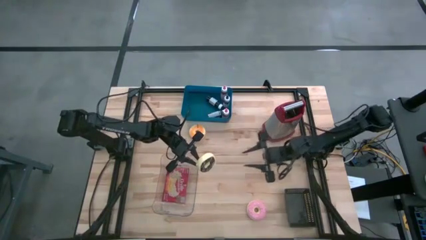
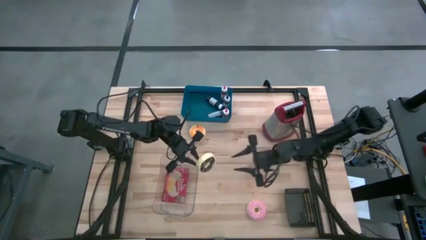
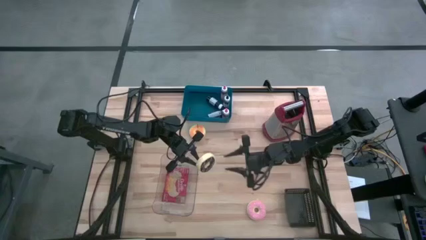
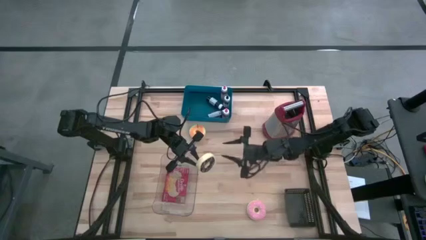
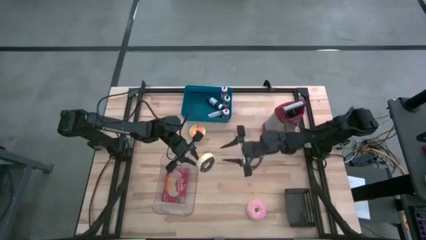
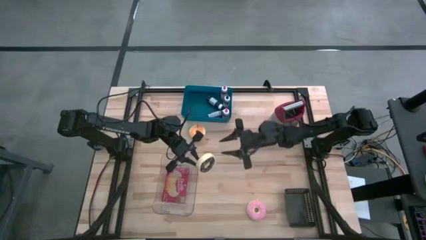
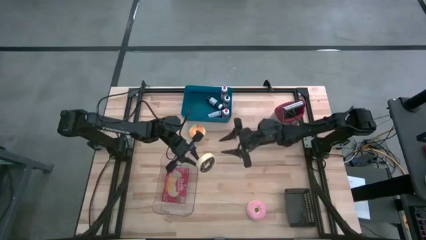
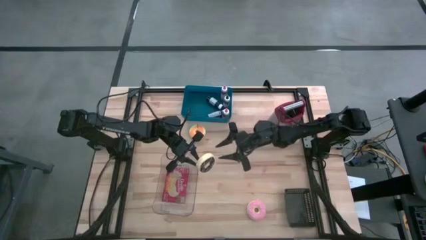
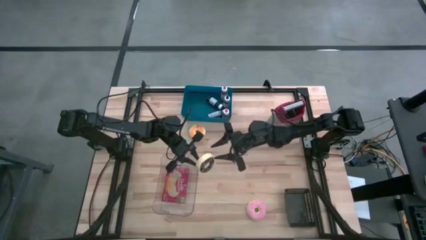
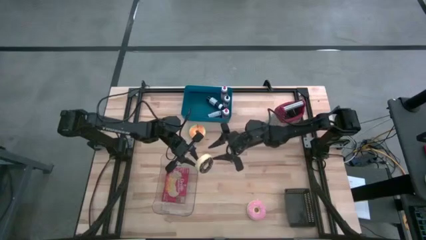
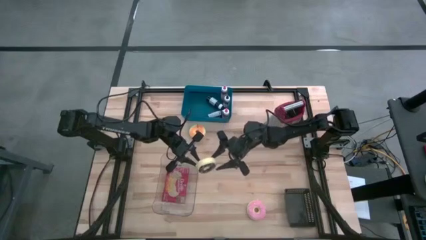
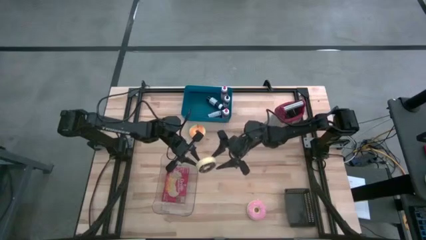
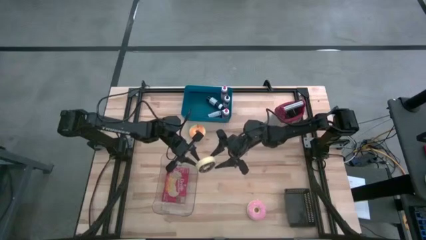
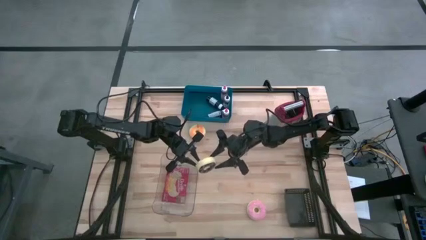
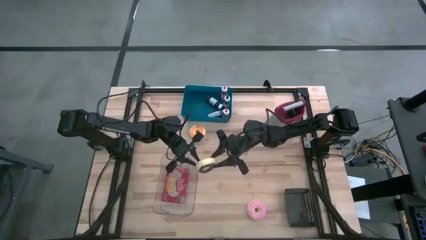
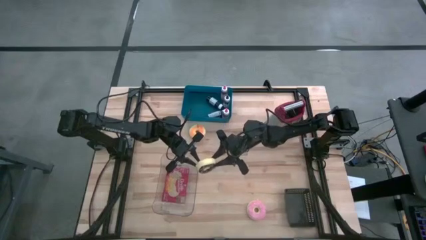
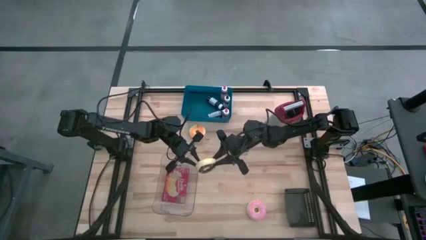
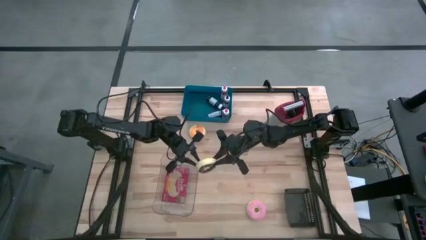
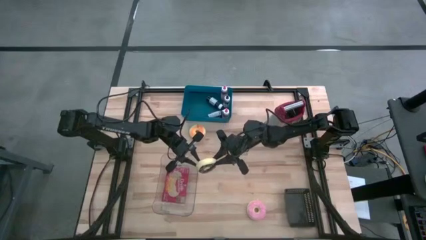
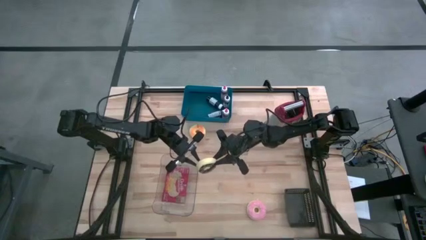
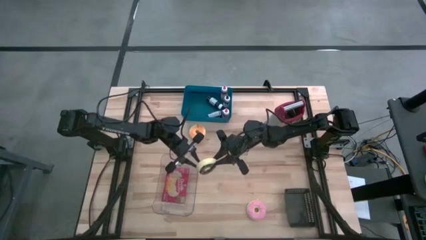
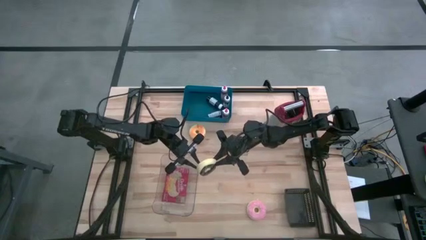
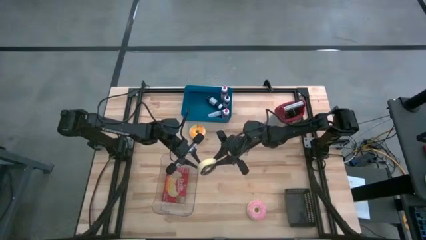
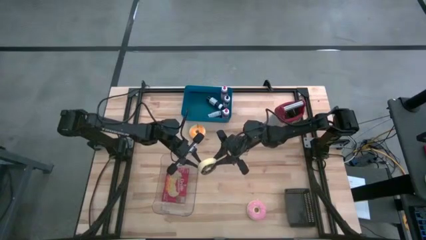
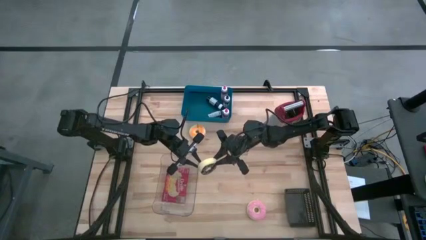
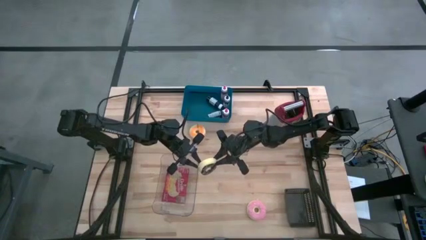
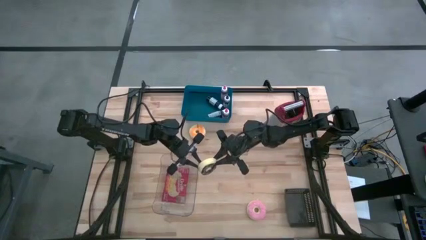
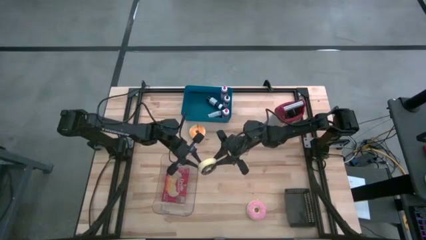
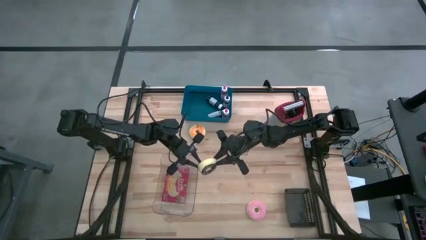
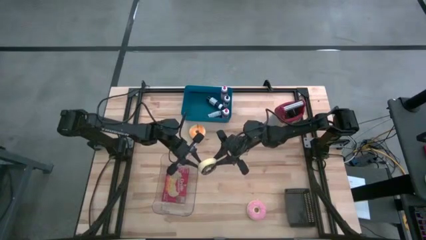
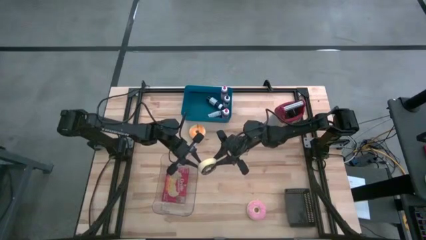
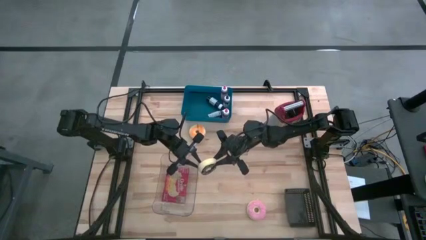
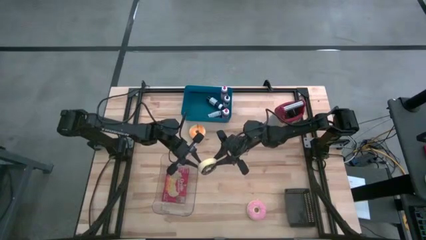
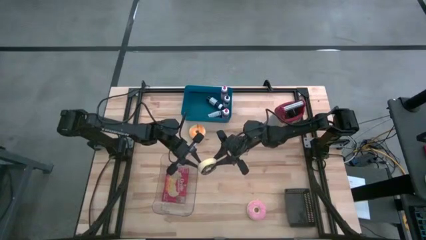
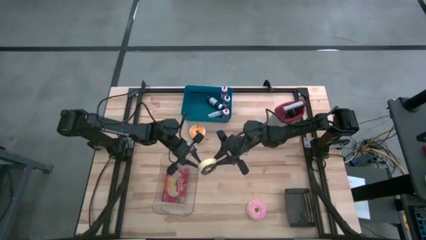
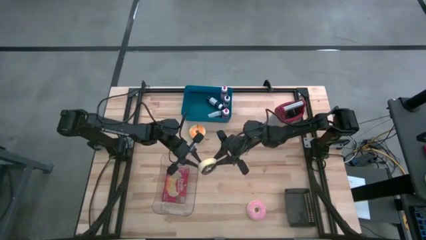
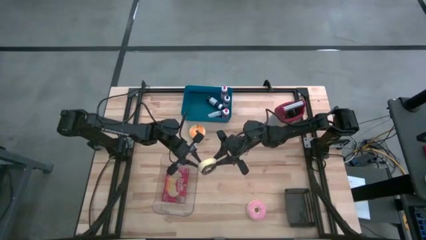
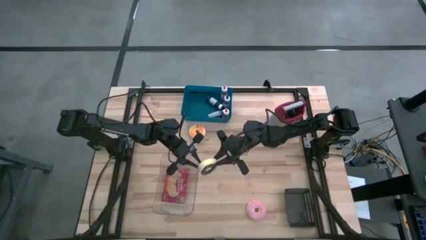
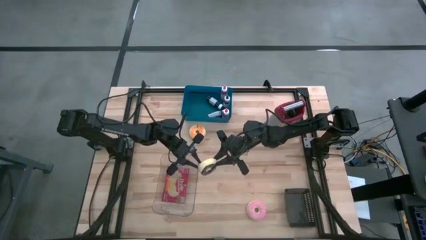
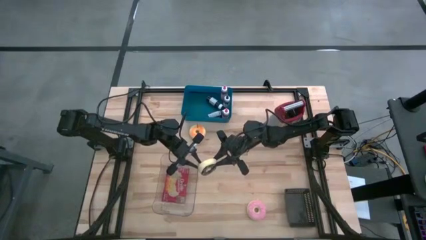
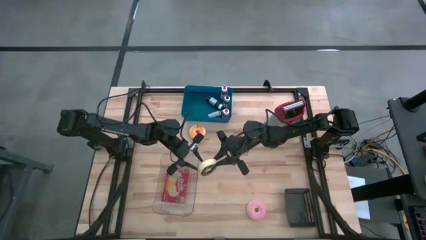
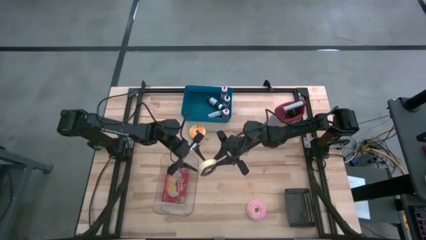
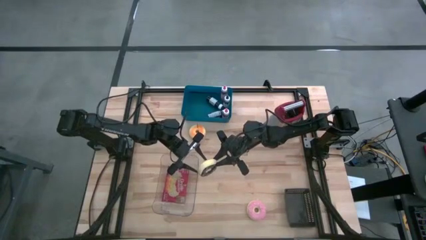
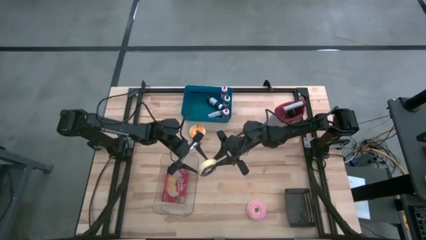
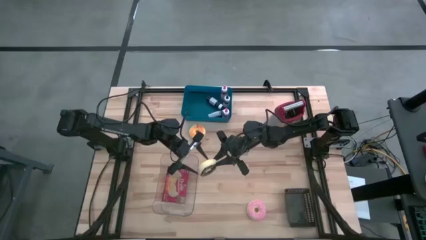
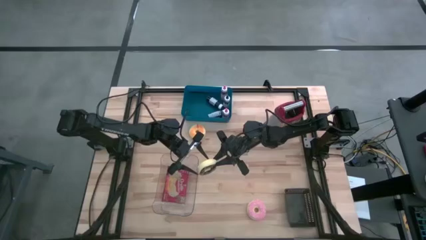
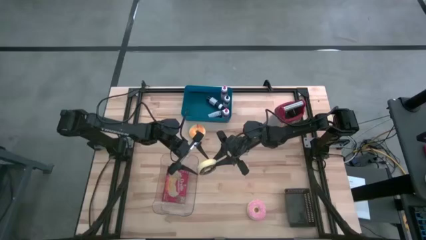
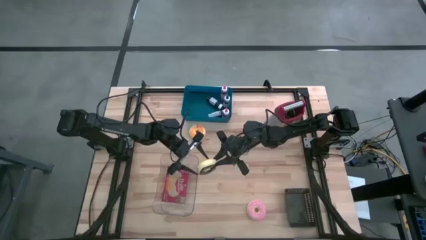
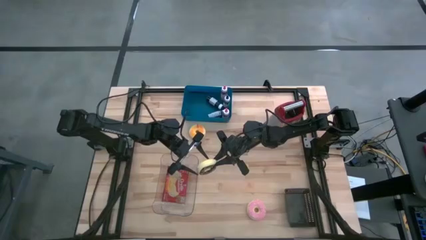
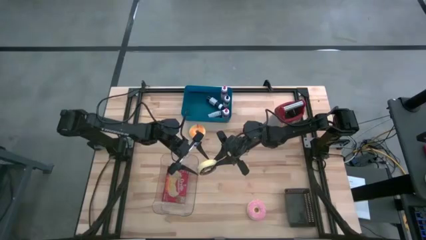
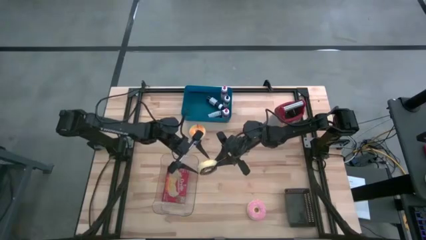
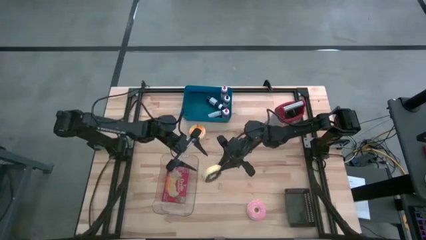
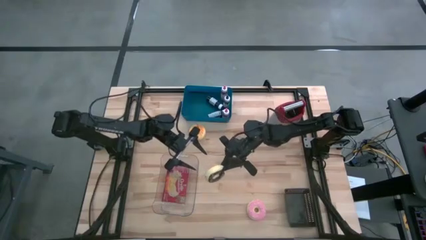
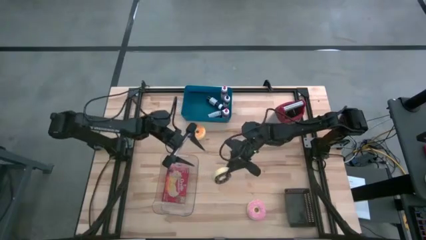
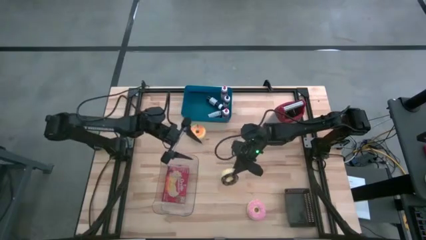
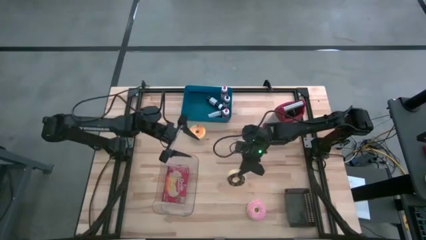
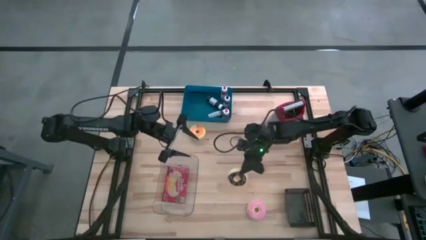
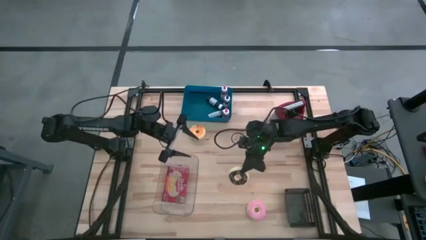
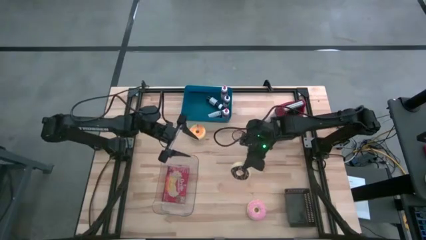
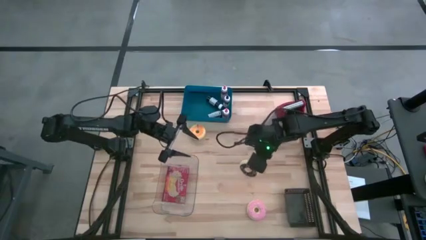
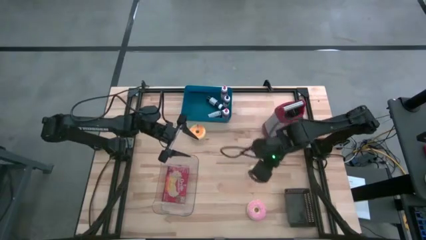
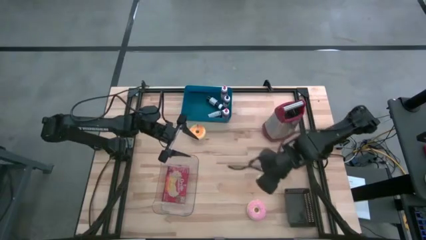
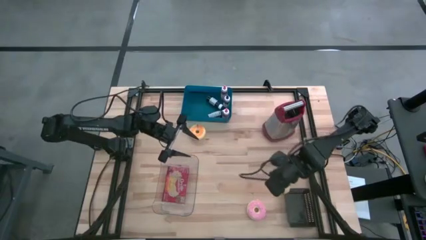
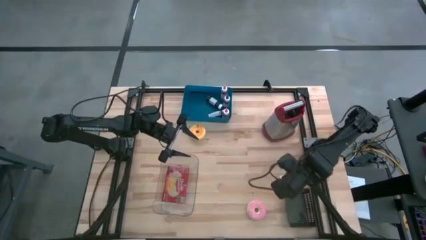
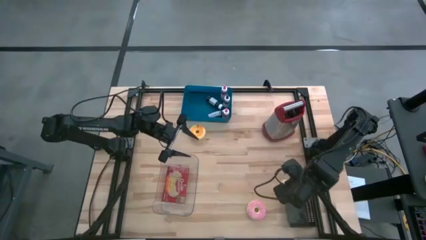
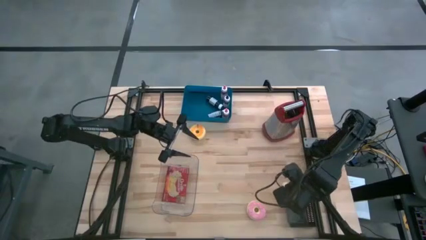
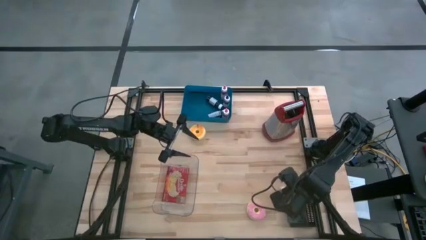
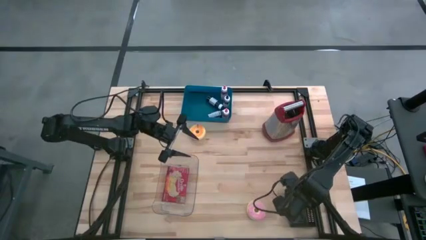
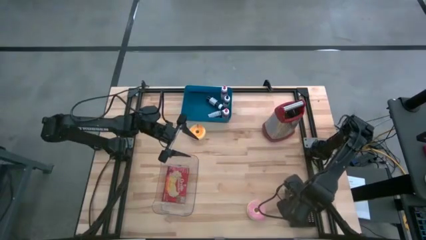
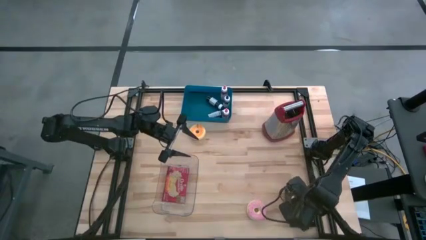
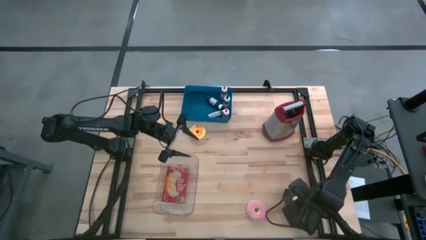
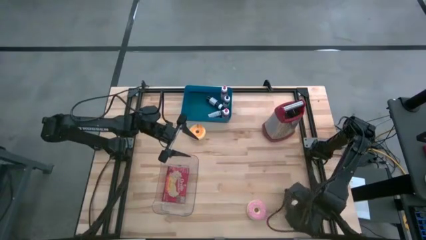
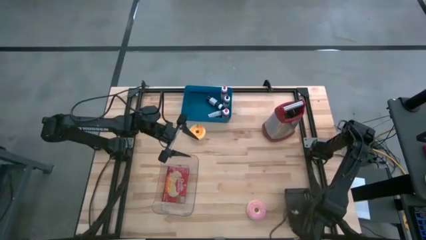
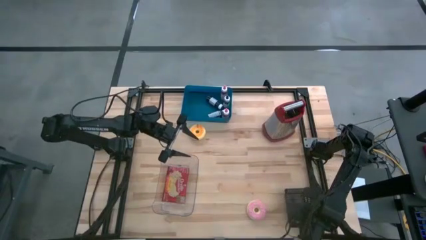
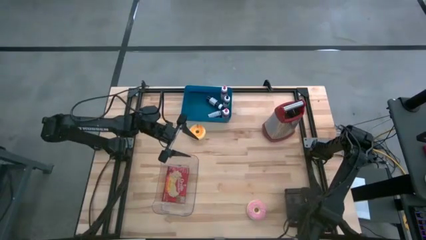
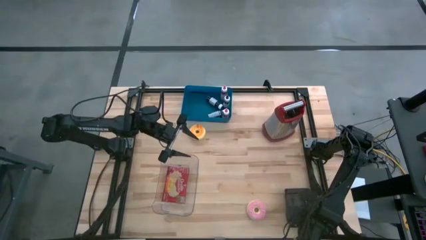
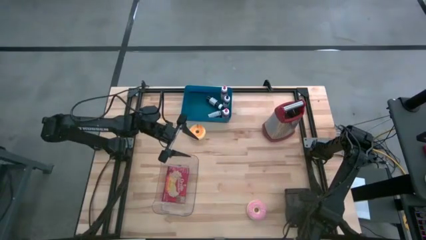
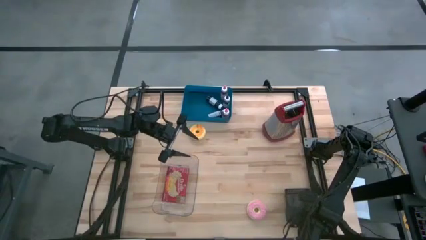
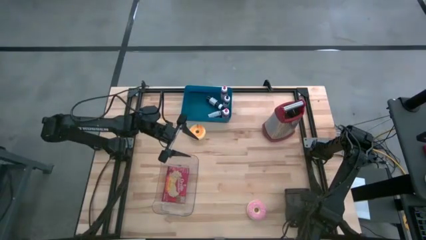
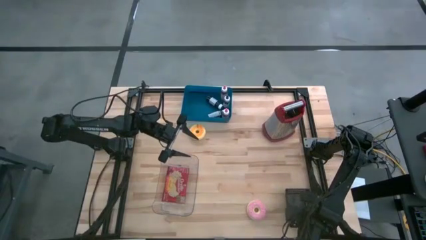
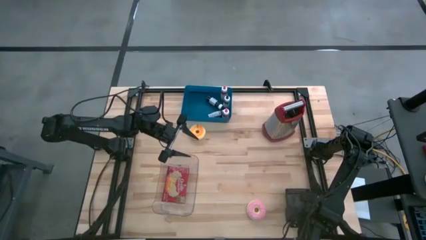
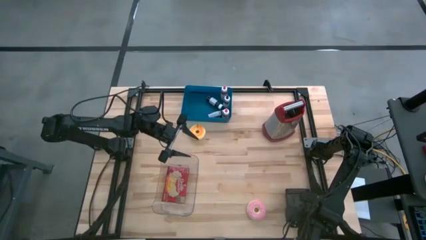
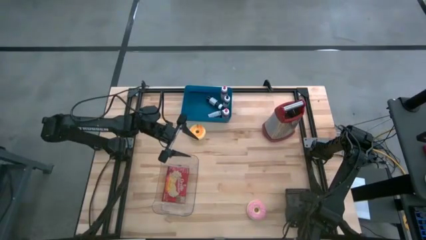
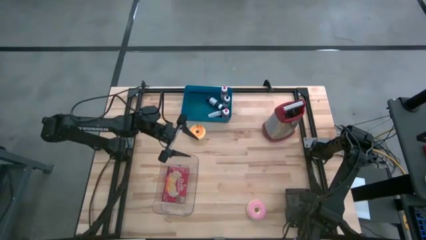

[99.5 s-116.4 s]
Task: Pick & Place Food Item
Put the top yellow black donut into the black bin
